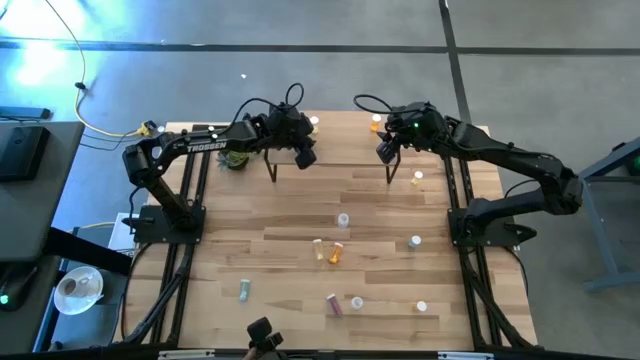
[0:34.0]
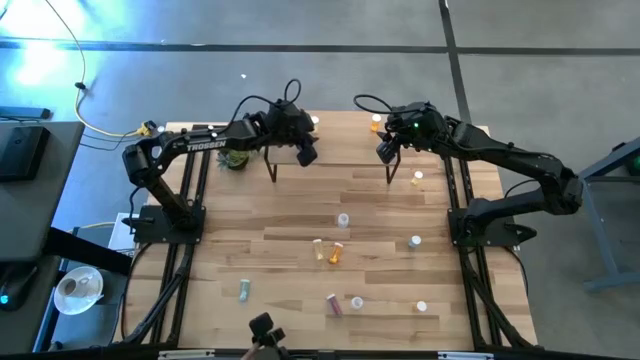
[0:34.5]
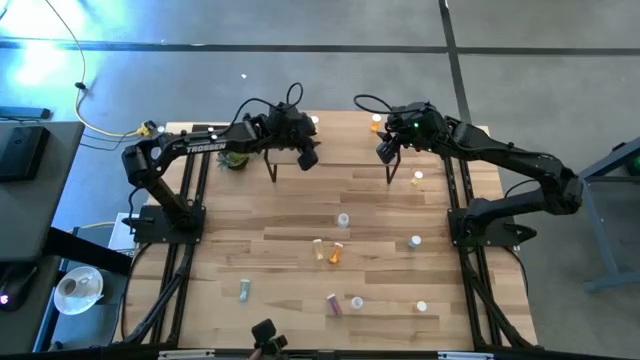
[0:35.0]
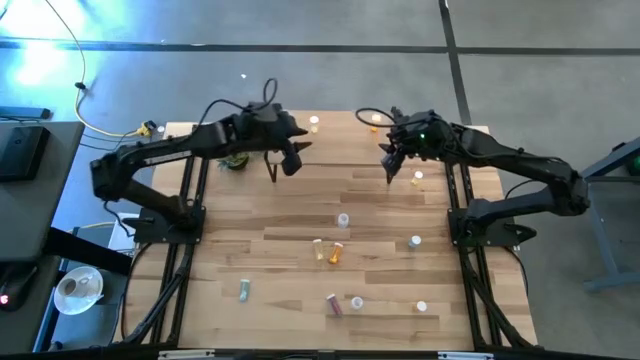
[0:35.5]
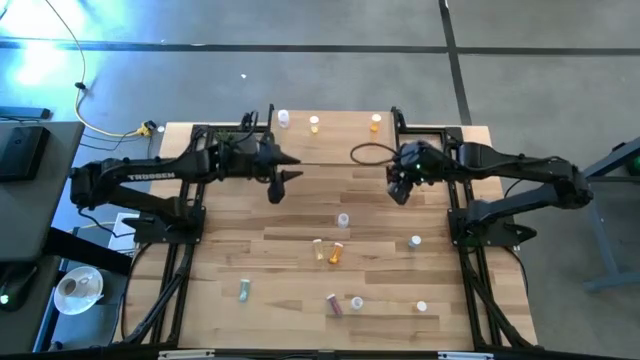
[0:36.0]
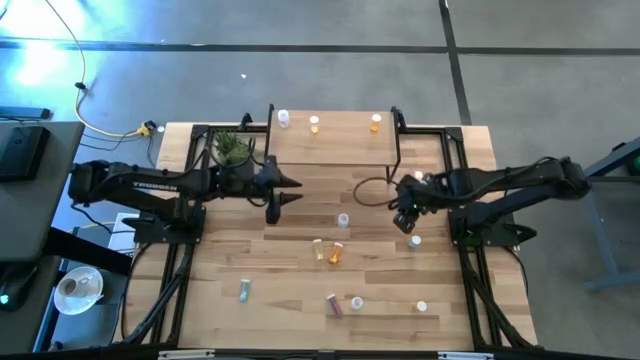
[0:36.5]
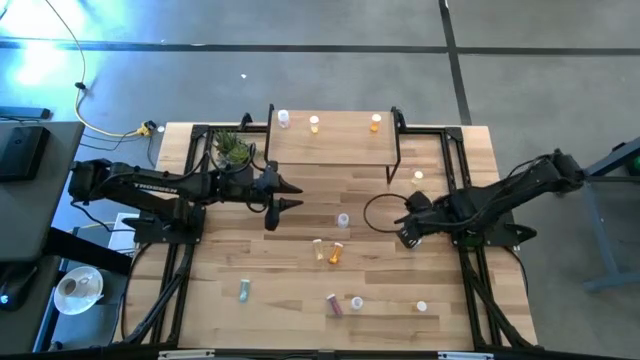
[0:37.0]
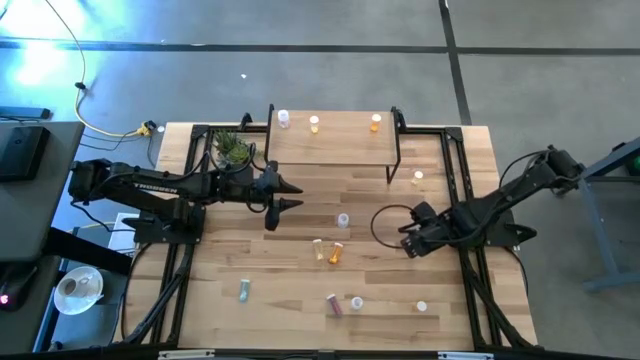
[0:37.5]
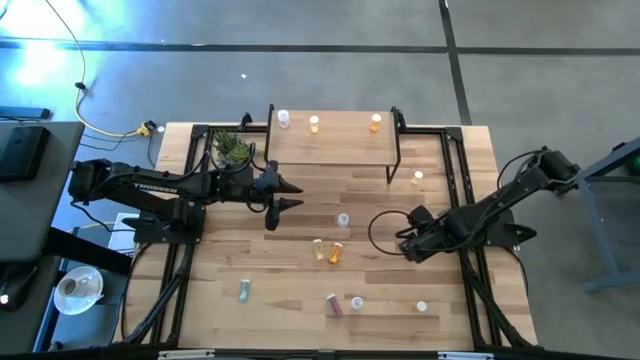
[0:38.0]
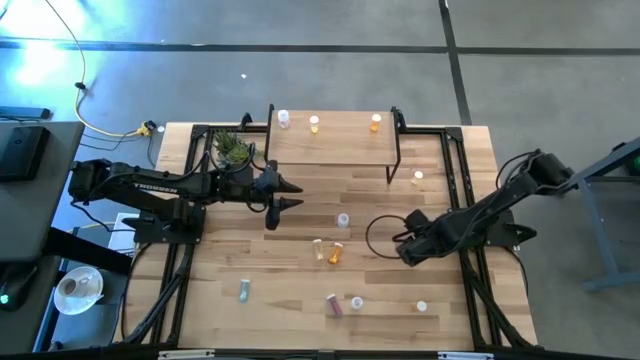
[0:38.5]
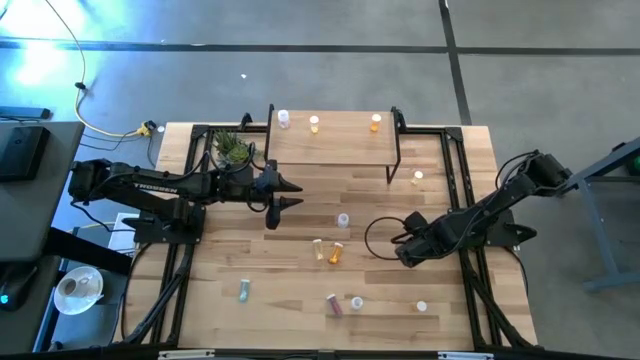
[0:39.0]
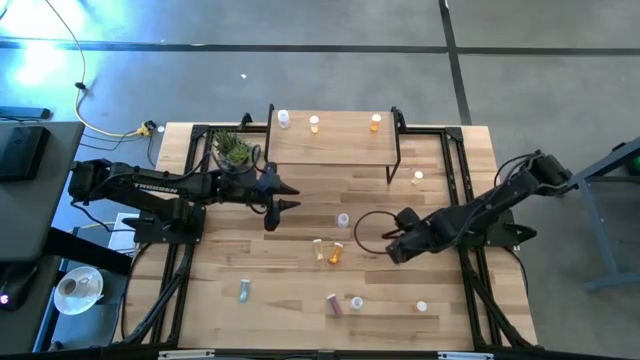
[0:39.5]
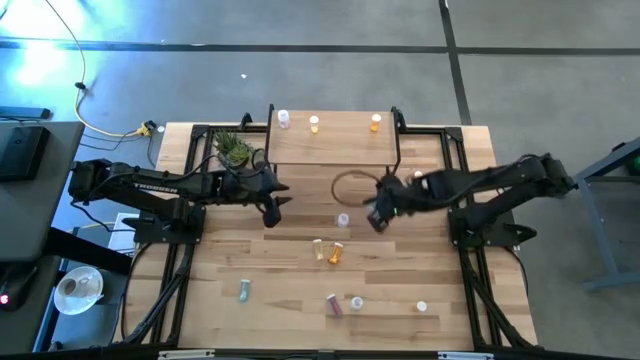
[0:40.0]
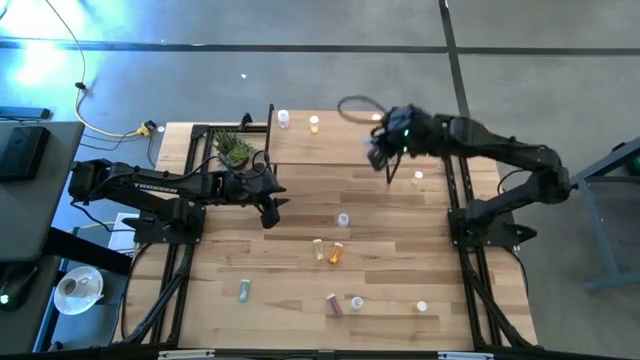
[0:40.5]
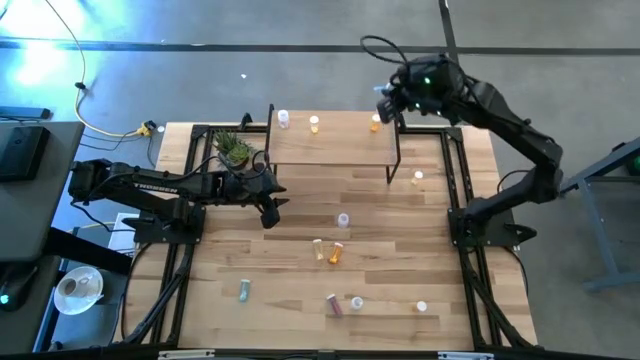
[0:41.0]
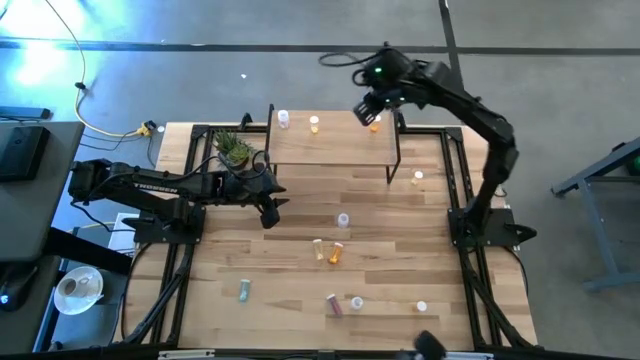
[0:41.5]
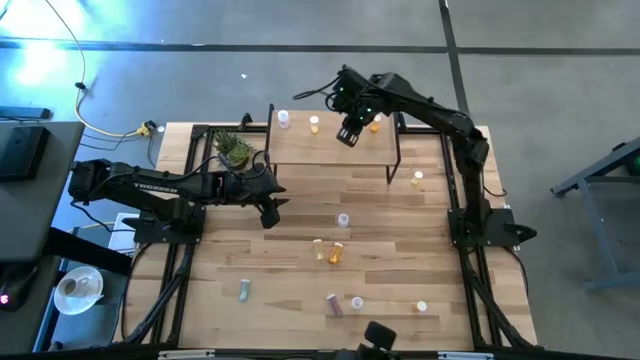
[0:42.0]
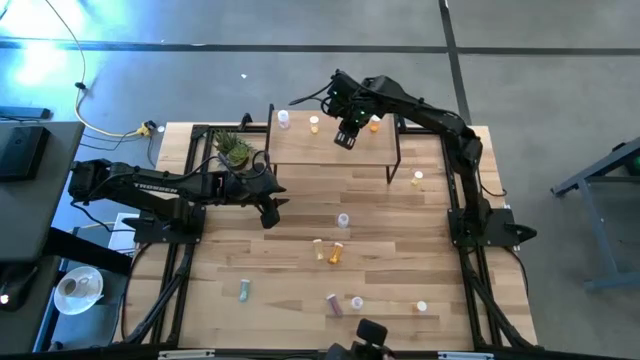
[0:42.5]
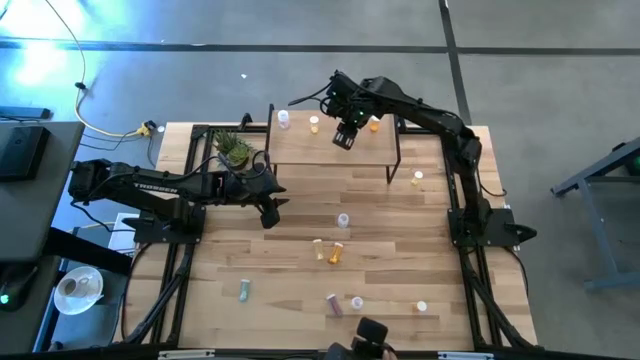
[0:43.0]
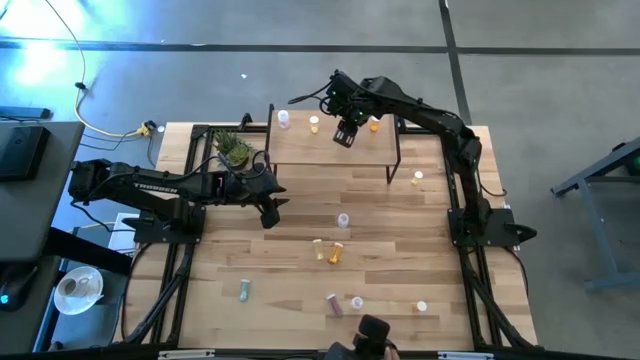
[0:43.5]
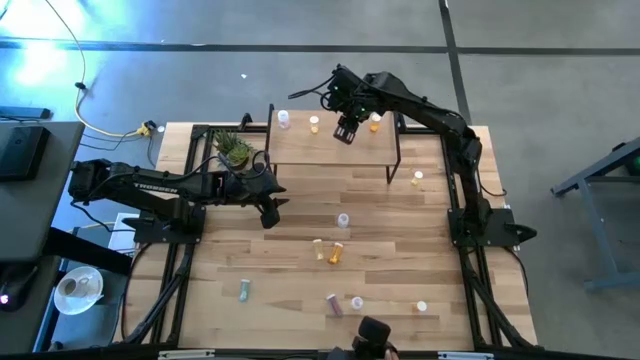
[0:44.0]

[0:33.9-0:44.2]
Task: Pick and place medicine bottles onto shelf by color
Put the blue pill bottle on the shelf

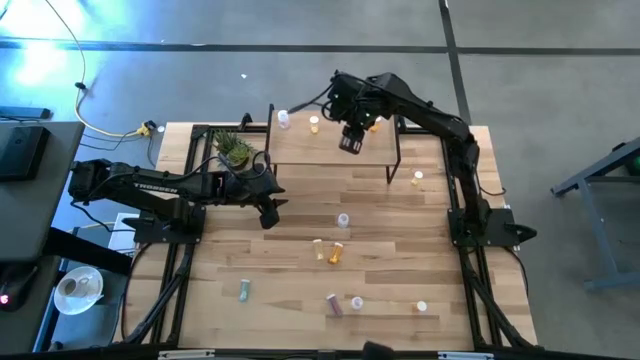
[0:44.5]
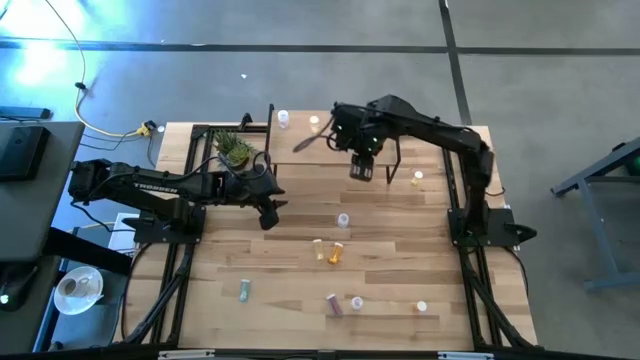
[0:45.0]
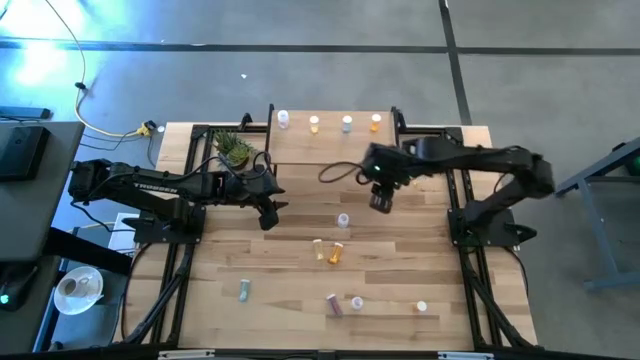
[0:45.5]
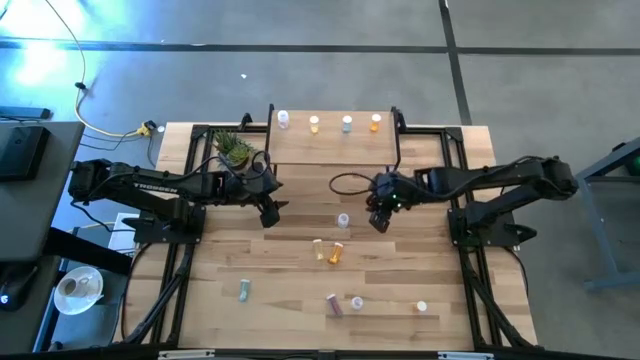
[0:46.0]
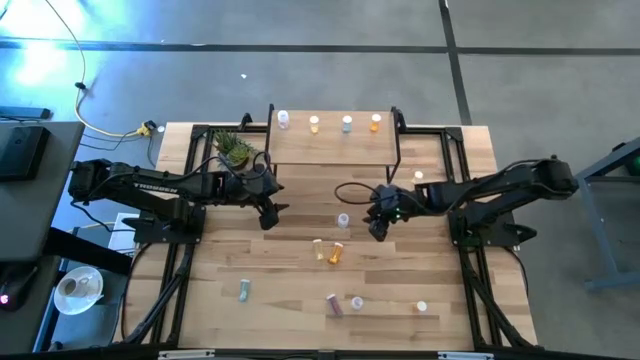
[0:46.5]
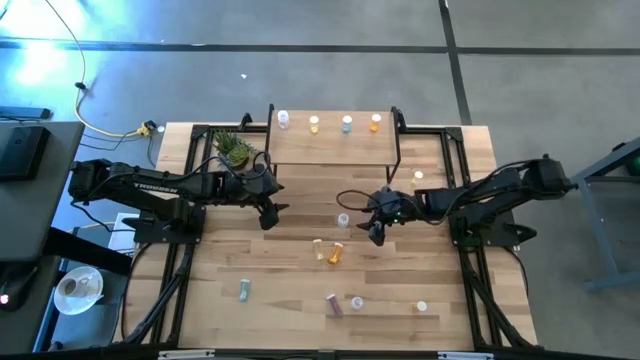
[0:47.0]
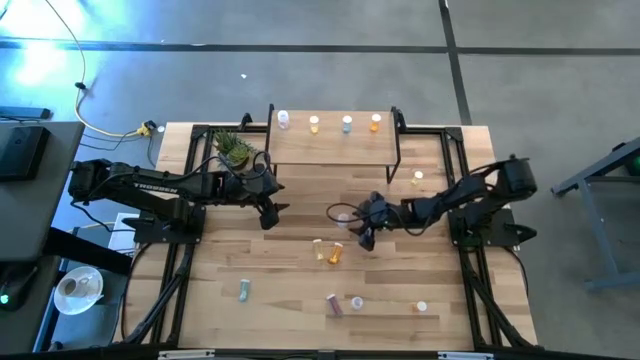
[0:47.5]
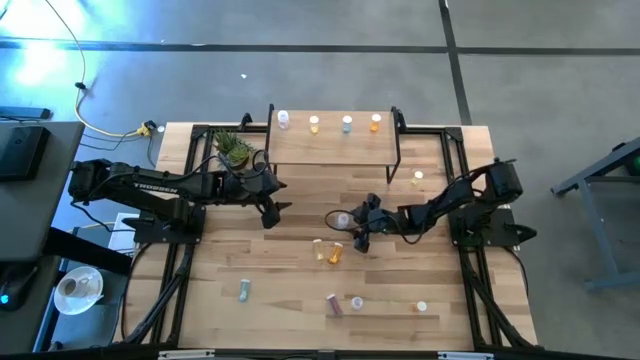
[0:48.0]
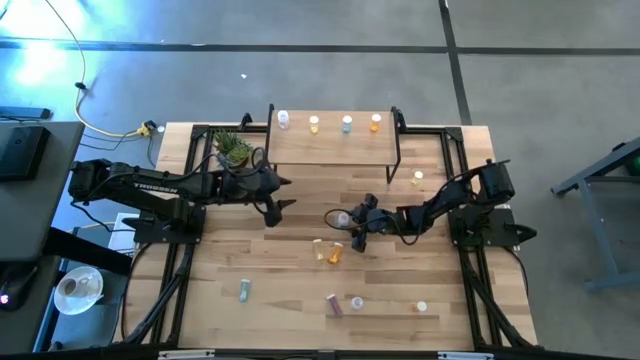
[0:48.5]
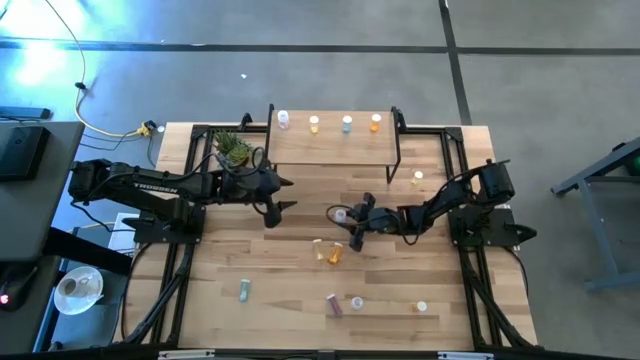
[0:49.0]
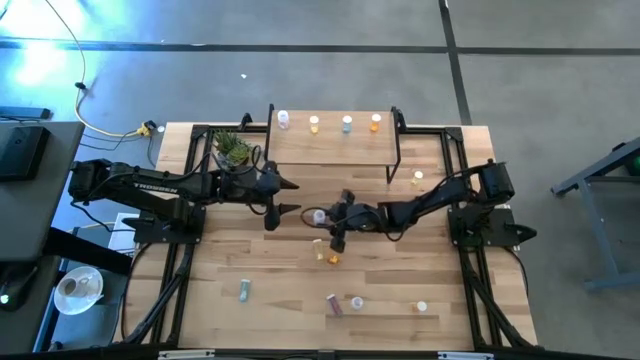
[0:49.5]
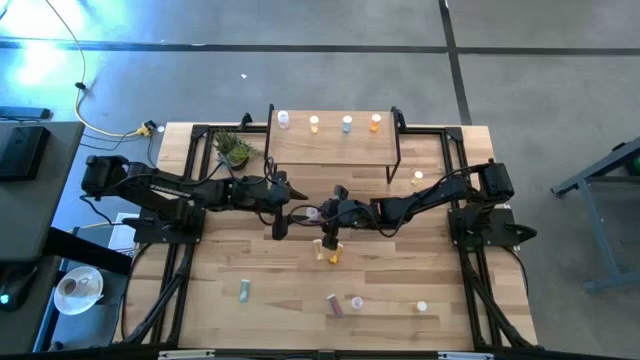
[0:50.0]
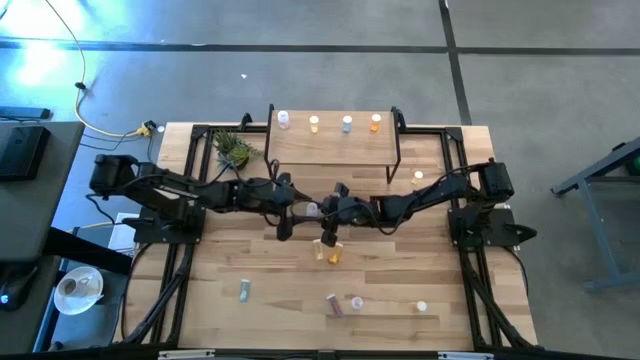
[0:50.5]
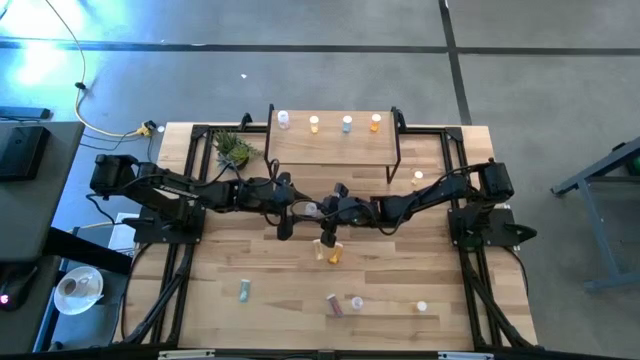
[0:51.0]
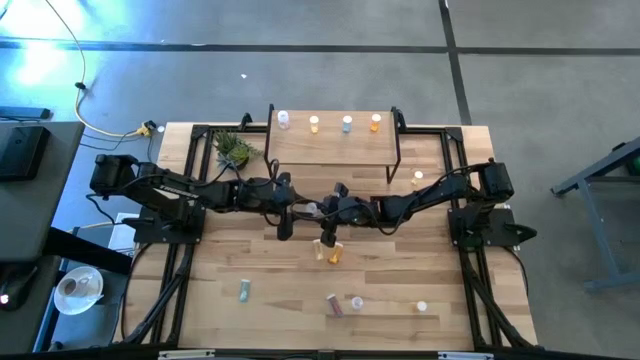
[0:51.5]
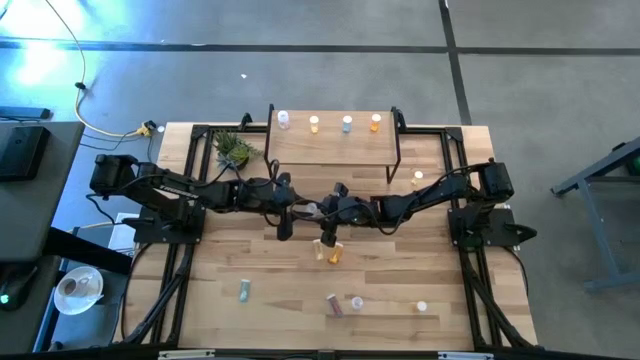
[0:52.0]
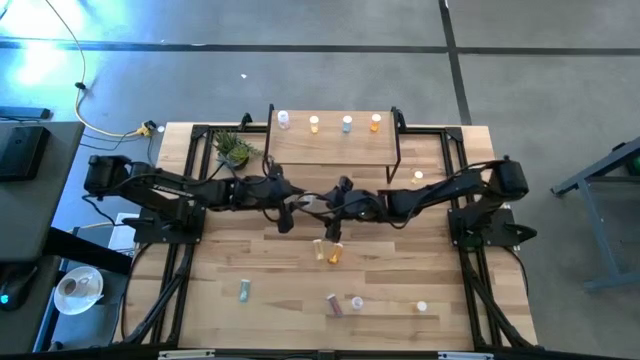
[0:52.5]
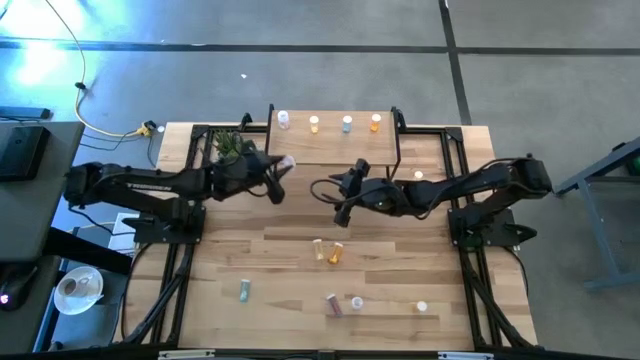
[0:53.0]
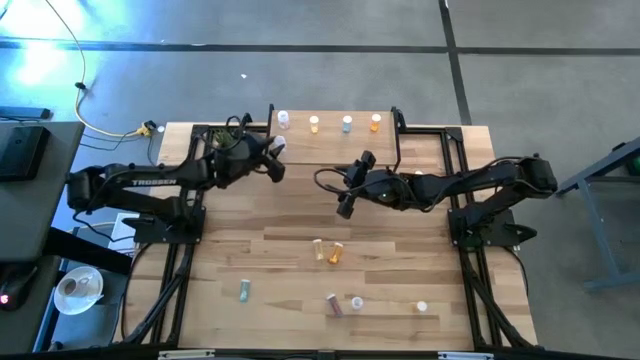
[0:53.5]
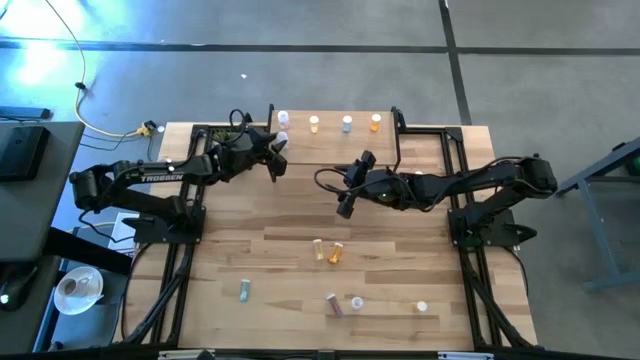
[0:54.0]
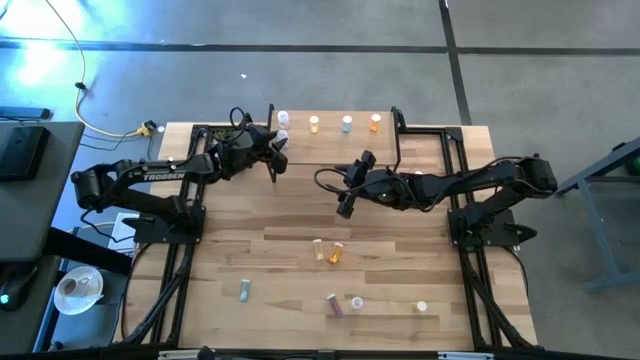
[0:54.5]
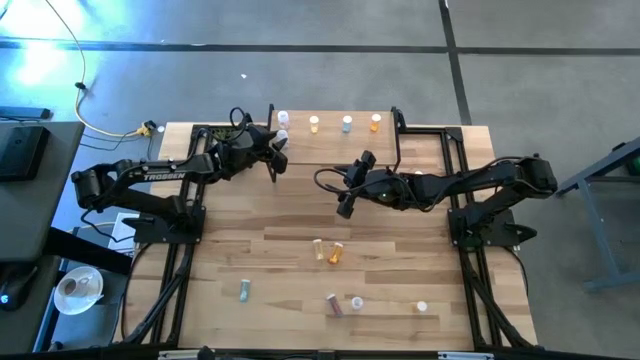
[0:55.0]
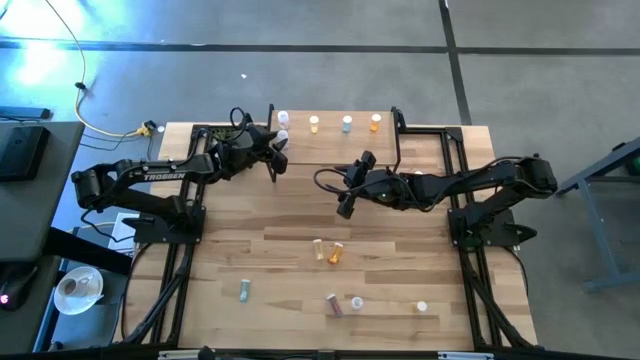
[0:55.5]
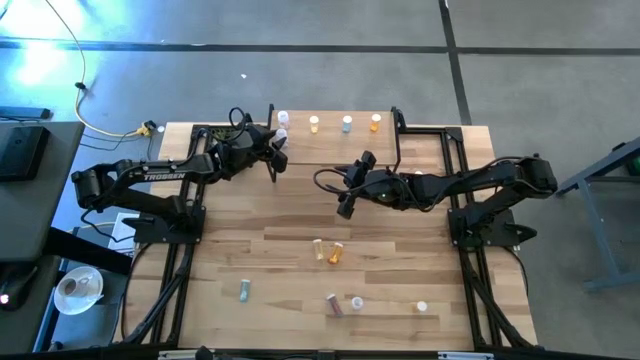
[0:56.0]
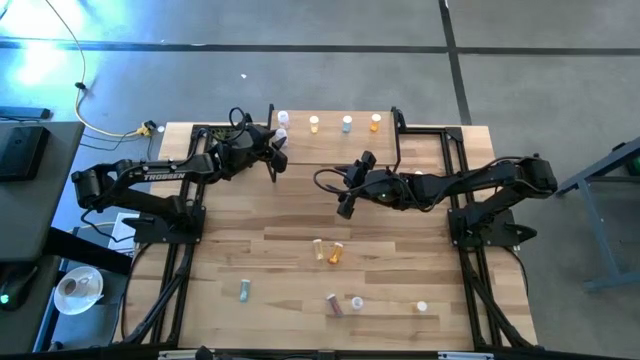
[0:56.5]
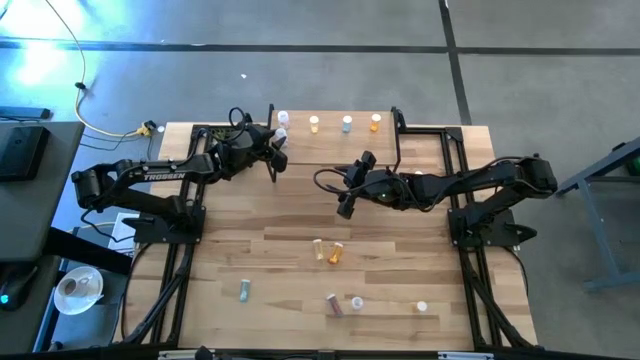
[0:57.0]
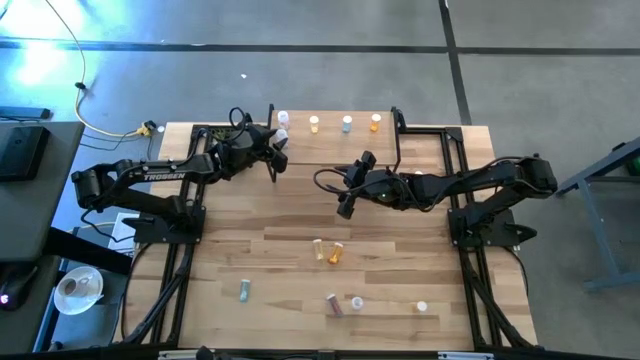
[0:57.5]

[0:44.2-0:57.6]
Put the transparent pill bottle aligned with the other transparent pill bottle on the shelf
